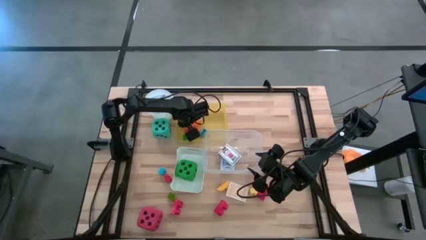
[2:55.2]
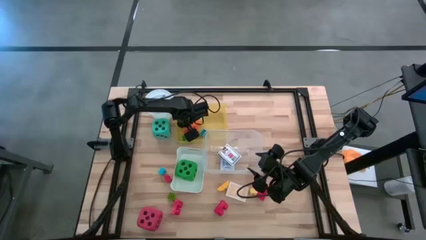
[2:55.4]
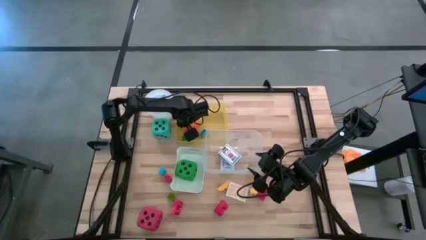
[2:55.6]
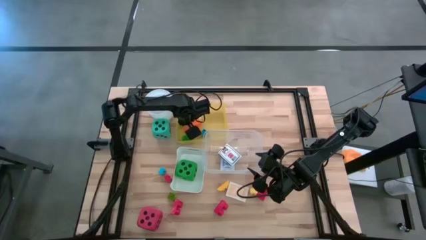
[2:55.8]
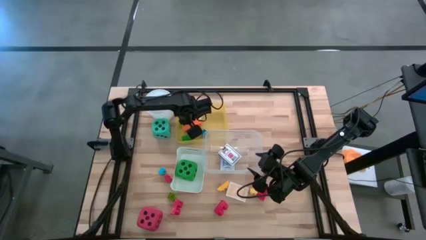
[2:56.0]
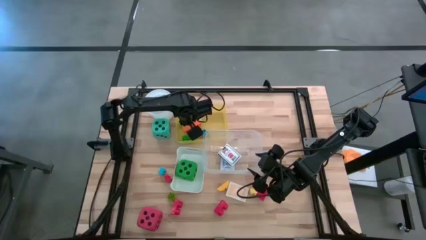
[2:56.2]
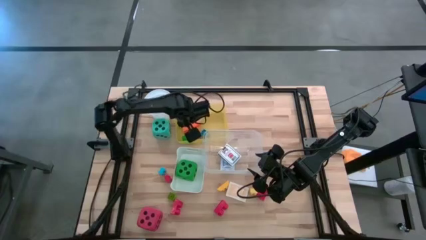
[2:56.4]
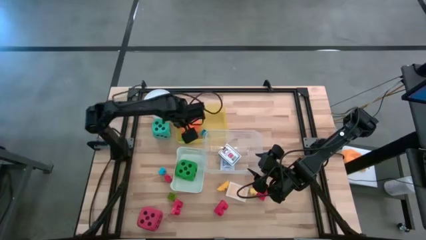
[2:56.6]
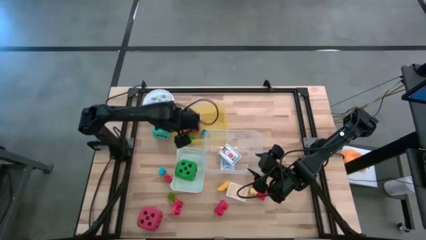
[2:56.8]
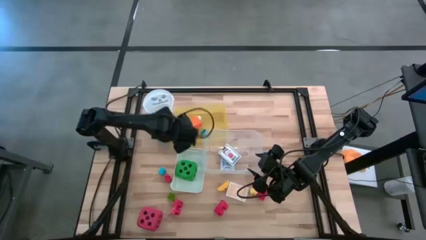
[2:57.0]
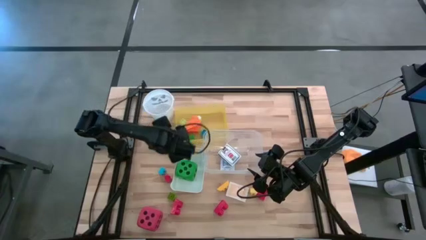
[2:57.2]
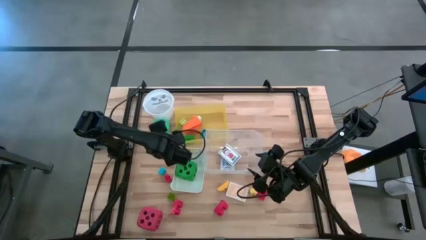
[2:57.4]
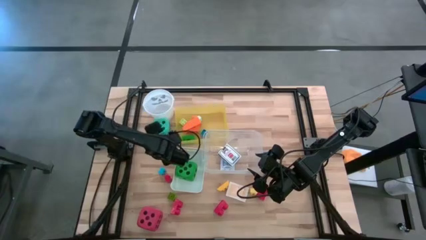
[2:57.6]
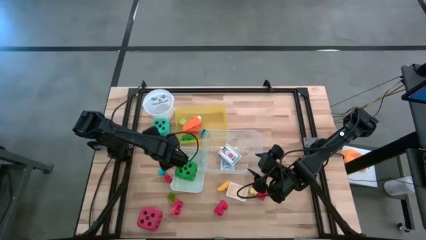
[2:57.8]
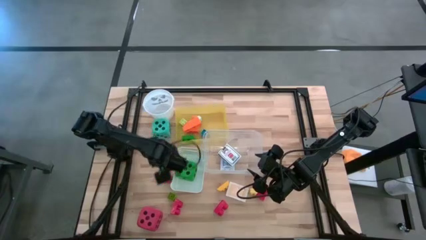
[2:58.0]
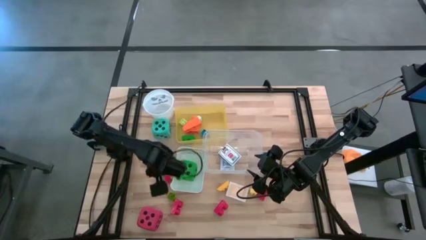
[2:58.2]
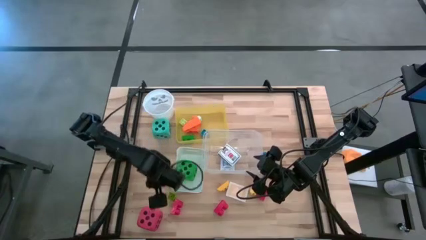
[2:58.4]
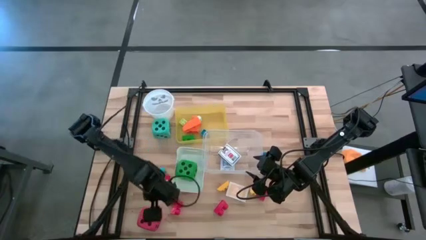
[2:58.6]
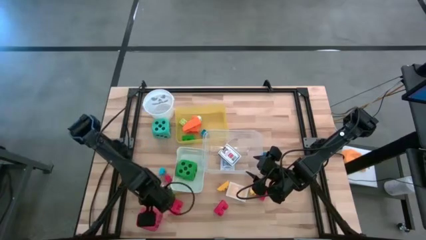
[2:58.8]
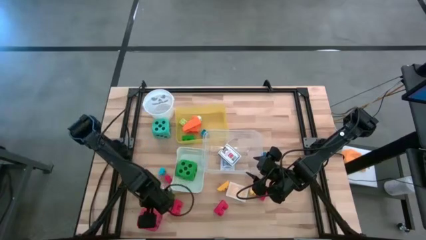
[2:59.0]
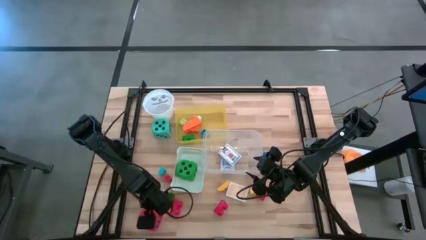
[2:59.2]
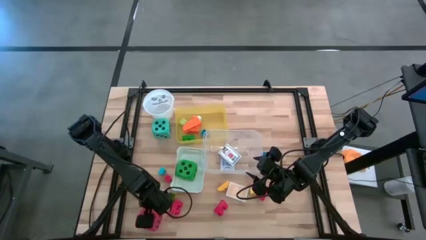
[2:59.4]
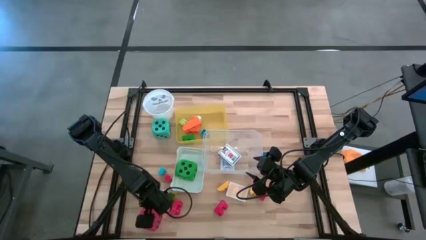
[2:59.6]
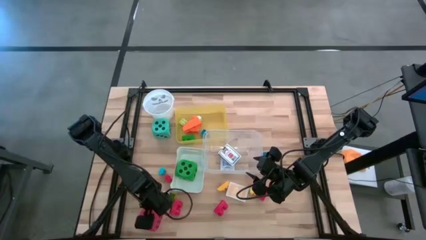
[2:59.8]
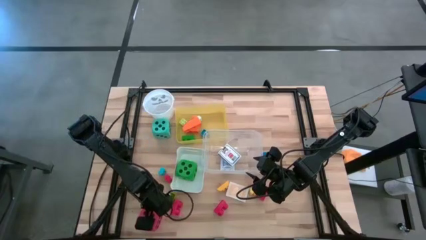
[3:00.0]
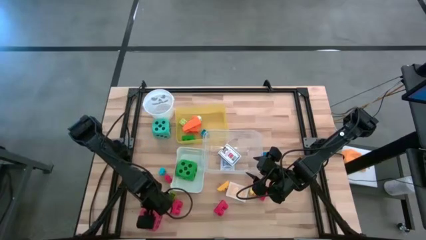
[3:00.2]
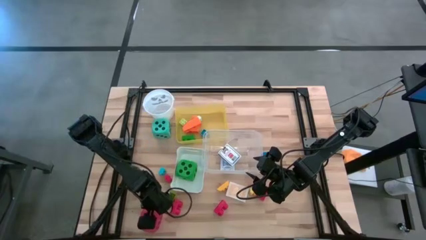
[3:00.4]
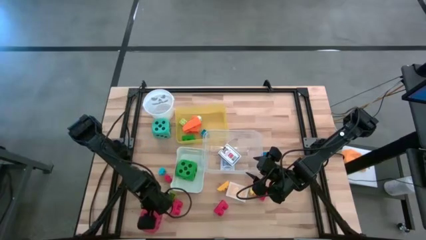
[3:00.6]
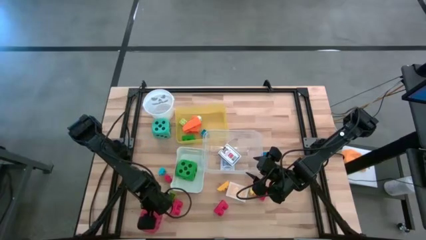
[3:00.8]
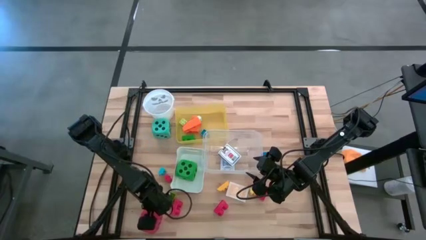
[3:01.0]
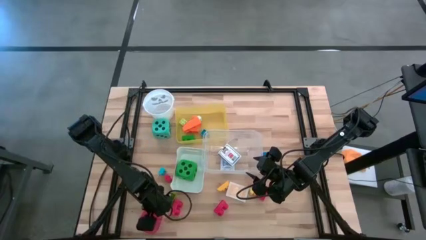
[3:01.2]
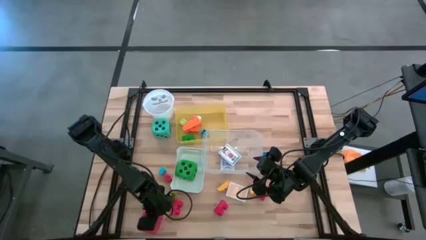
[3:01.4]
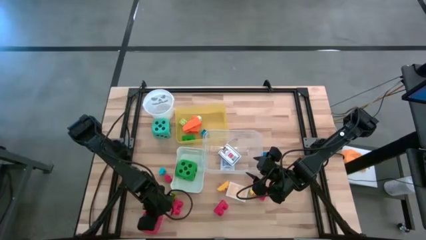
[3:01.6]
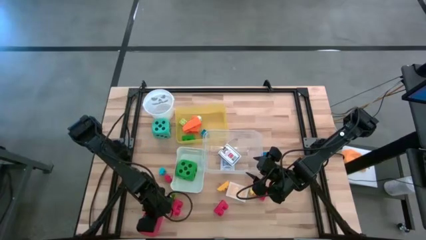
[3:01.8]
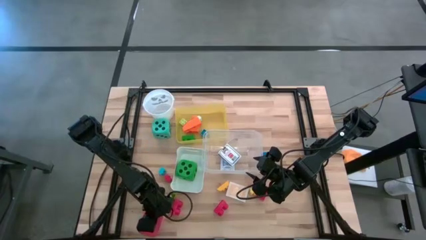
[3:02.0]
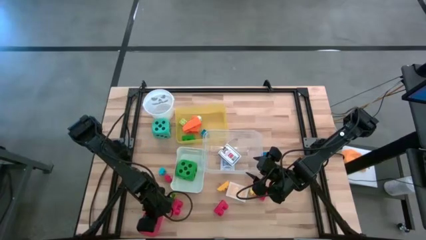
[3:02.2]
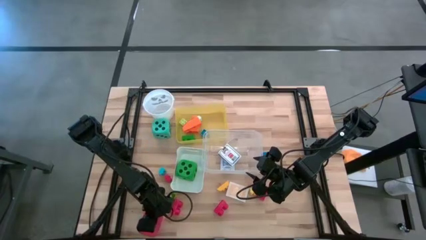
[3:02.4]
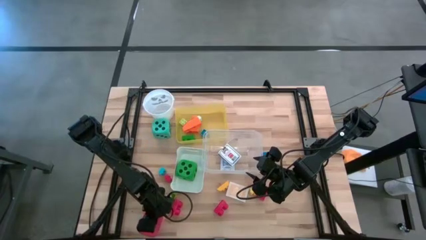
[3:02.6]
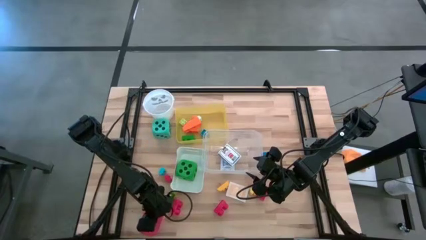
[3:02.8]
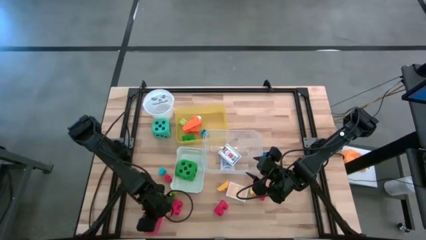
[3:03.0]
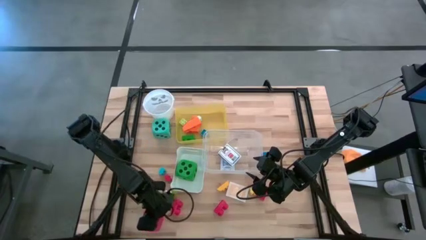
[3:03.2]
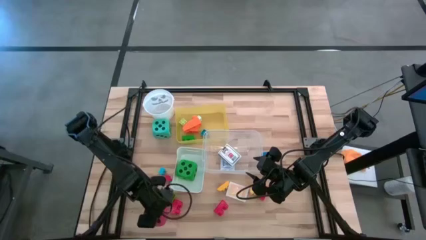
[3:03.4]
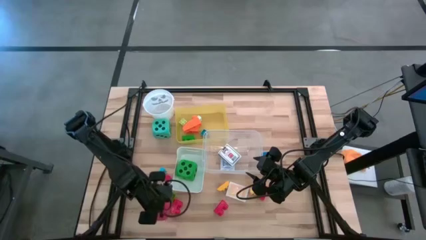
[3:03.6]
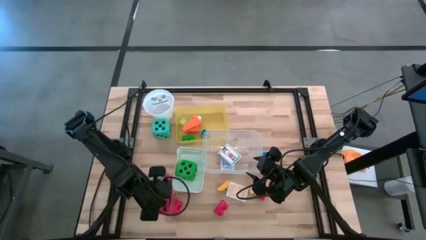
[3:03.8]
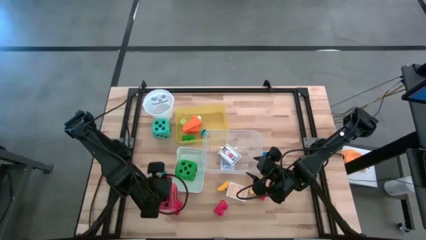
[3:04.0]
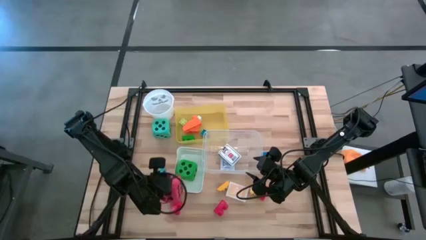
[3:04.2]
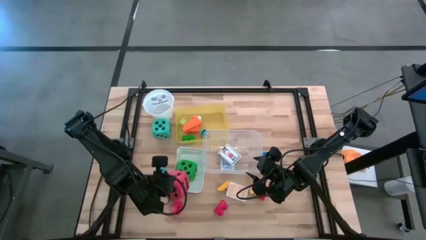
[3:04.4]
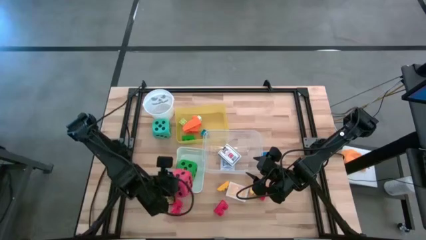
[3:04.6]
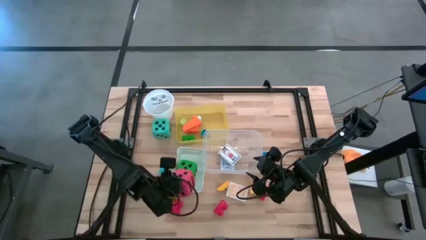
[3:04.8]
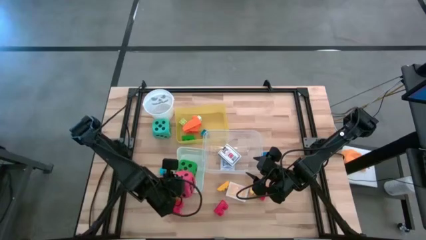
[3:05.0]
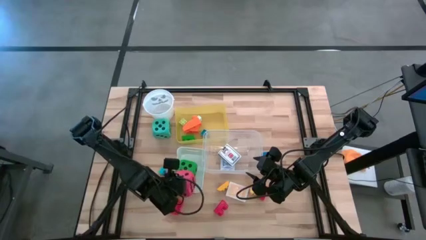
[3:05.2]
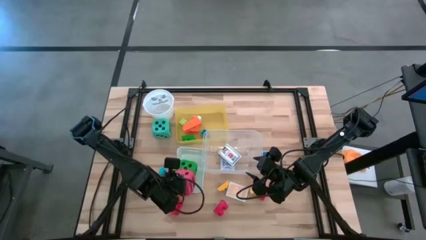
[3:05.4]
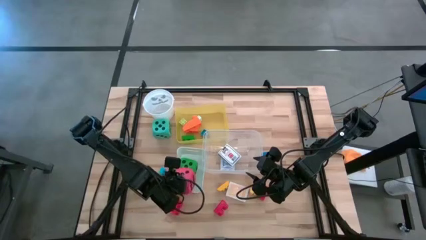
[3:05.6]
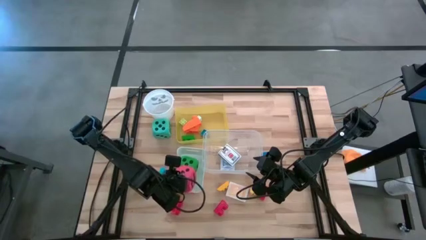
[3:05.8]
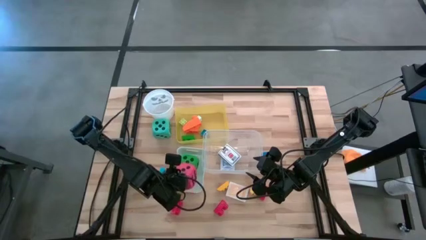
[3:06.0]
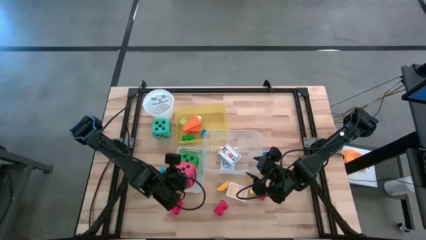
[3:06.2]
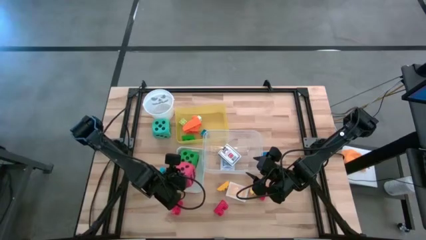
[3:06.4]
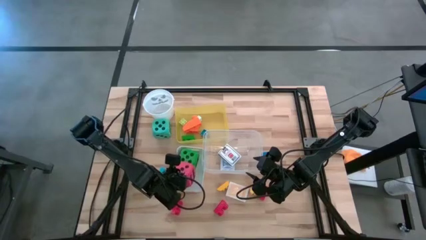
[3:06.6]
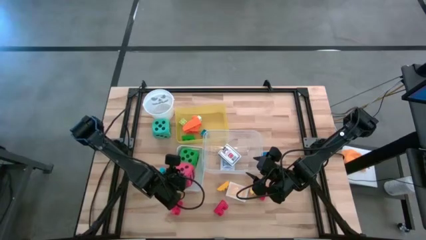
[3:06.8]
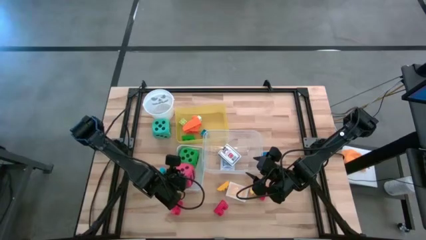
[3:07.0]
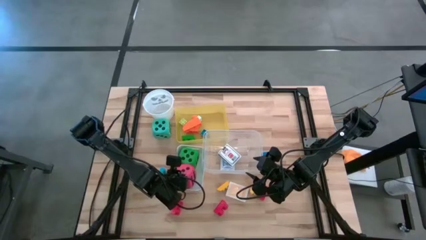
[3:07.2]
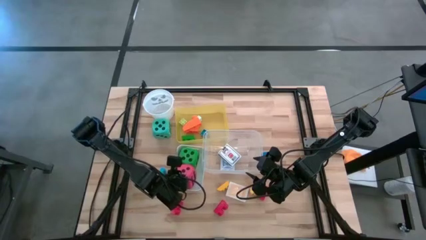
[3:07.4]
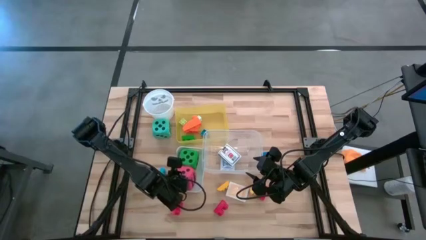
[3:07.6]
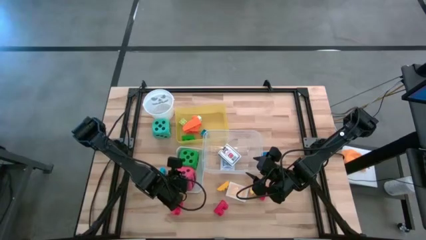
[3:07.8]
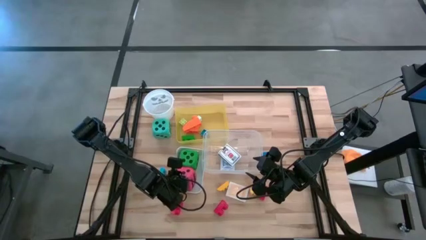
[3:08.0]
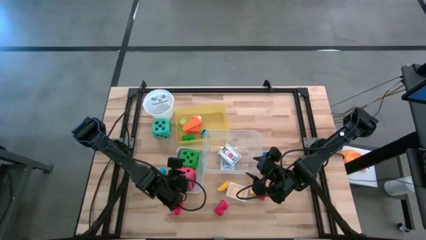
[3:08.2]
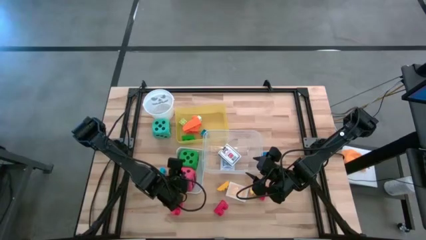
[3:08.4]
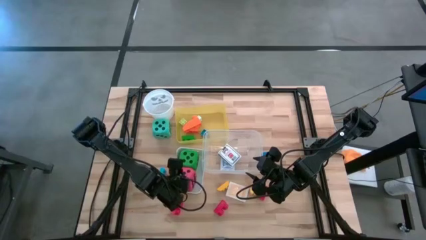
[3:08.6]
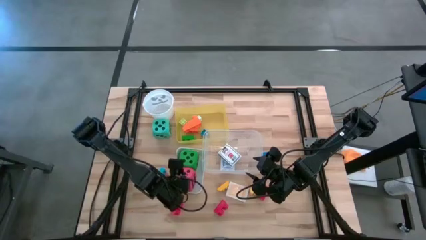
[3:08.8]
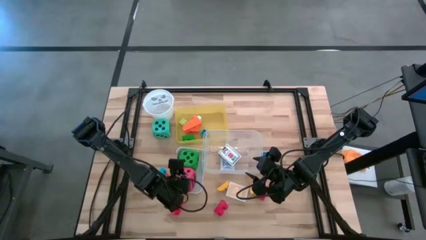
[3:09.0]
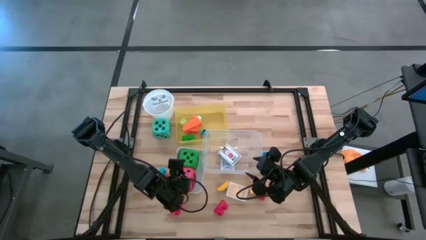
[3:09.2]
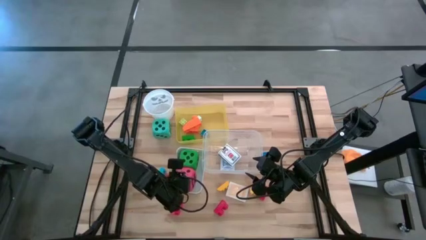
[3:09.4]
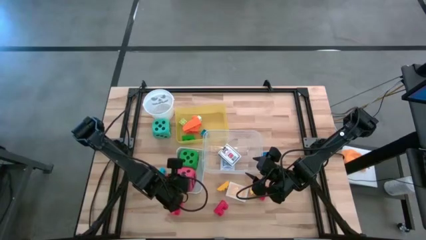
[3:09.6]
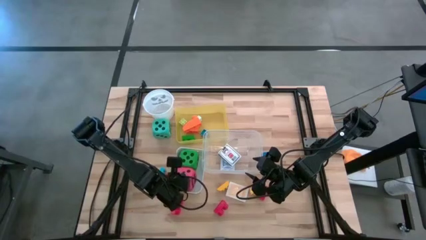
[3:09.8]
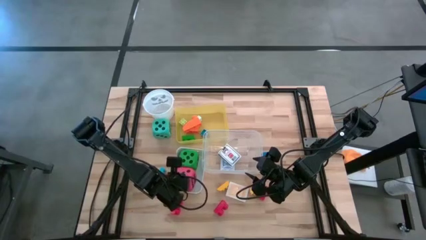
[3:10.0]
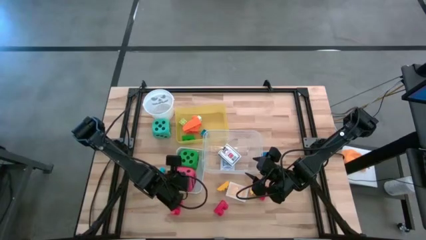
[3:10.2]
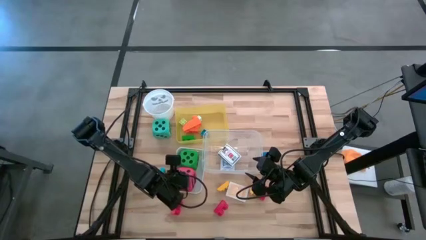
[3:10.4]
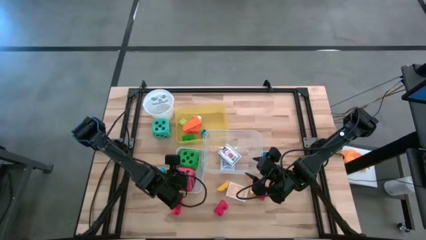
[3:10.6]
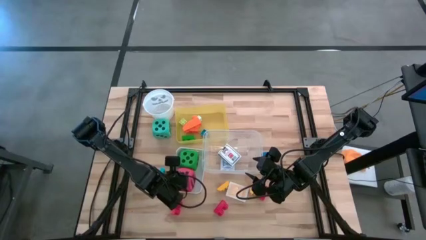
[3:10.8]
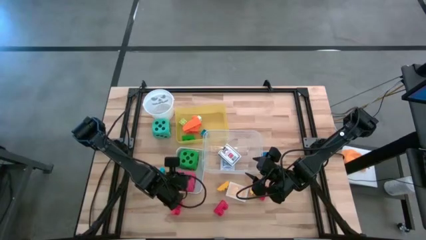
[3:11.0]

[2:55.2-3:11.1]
Task: Pick & Place Toys
Put the red dice into the white bin
